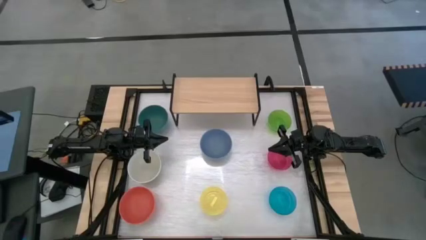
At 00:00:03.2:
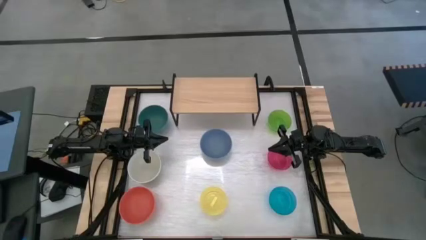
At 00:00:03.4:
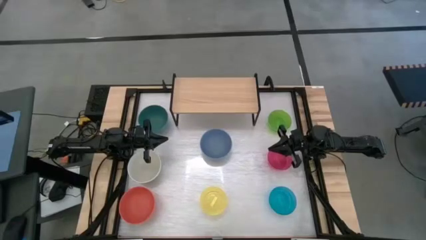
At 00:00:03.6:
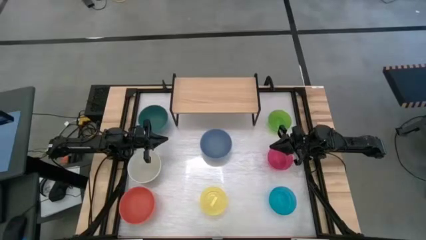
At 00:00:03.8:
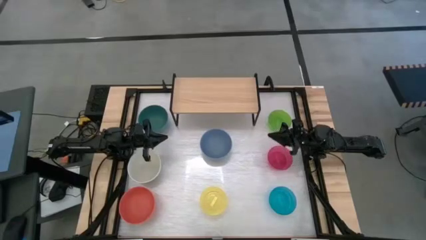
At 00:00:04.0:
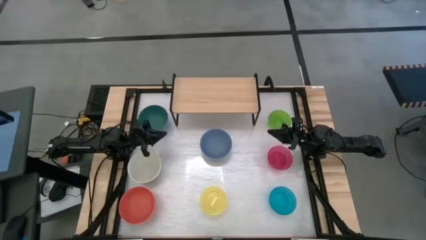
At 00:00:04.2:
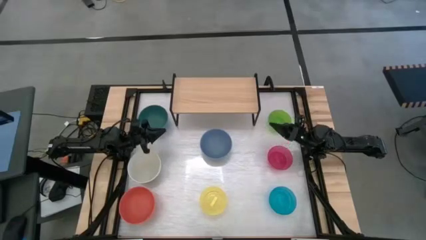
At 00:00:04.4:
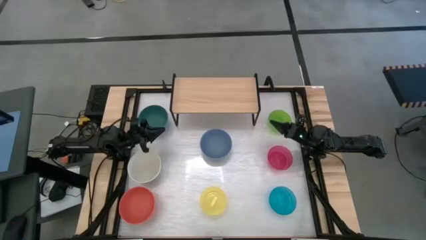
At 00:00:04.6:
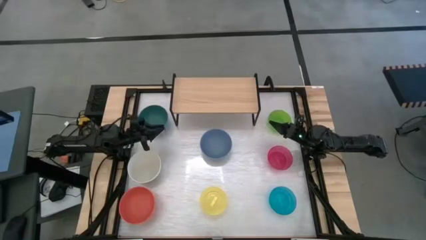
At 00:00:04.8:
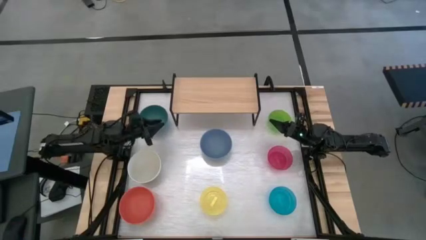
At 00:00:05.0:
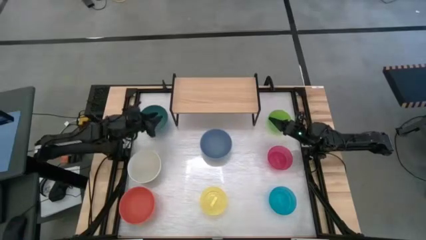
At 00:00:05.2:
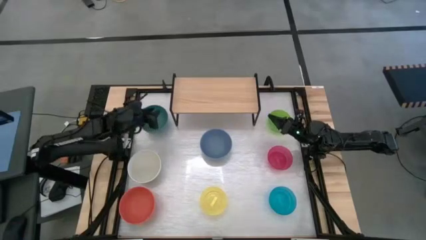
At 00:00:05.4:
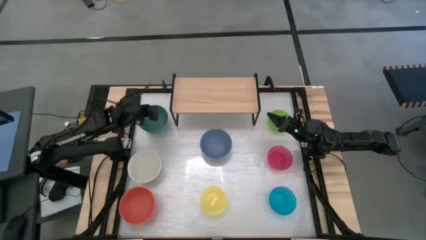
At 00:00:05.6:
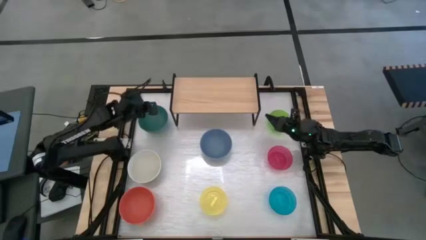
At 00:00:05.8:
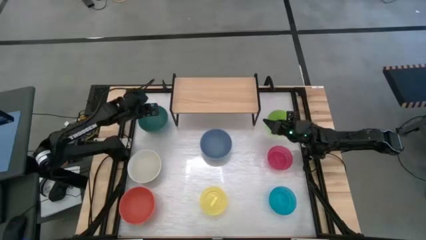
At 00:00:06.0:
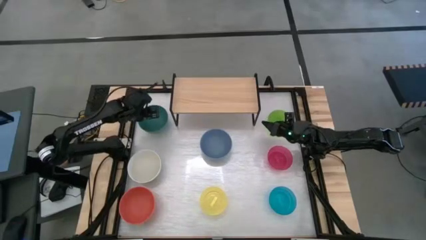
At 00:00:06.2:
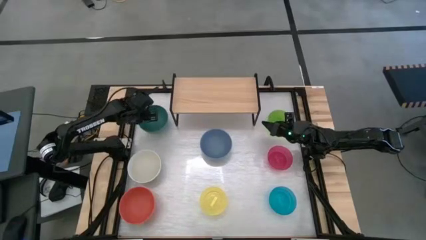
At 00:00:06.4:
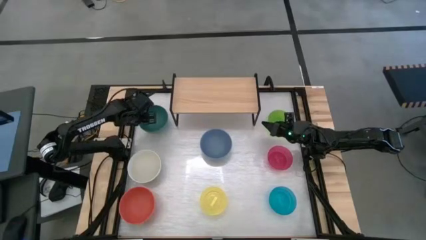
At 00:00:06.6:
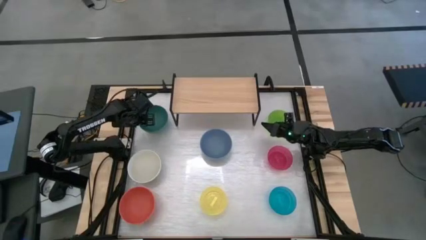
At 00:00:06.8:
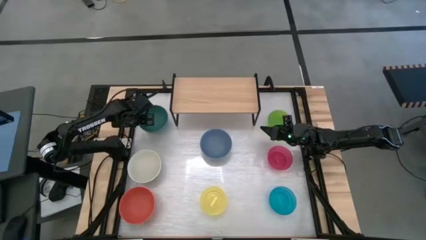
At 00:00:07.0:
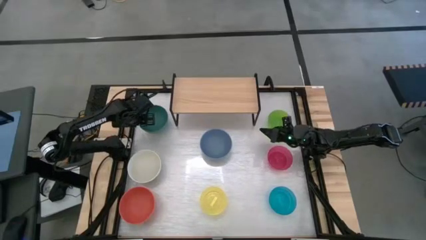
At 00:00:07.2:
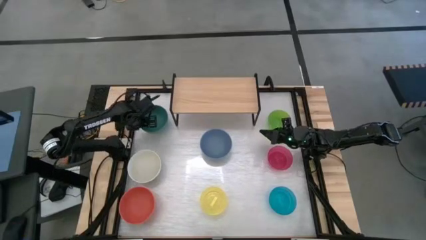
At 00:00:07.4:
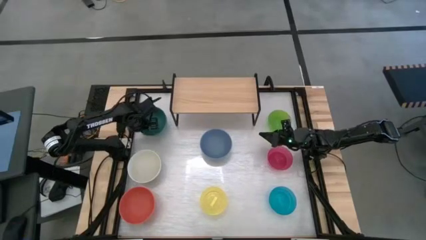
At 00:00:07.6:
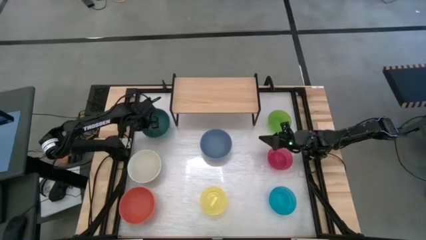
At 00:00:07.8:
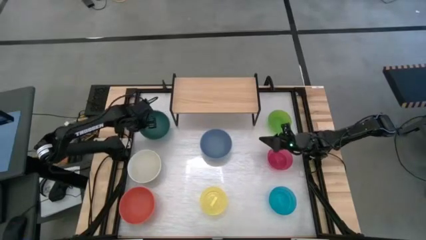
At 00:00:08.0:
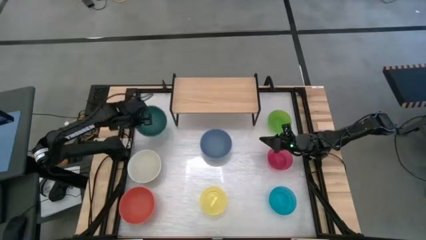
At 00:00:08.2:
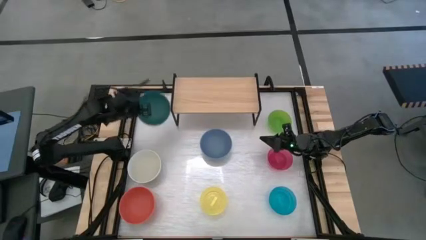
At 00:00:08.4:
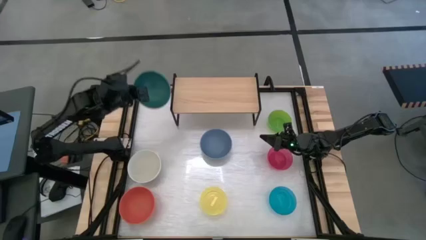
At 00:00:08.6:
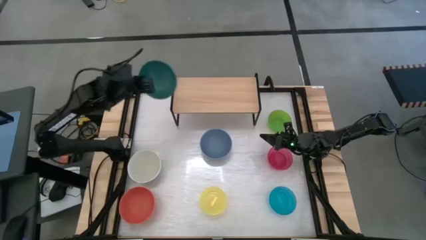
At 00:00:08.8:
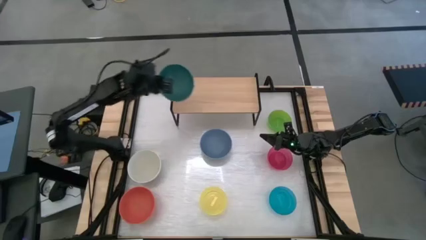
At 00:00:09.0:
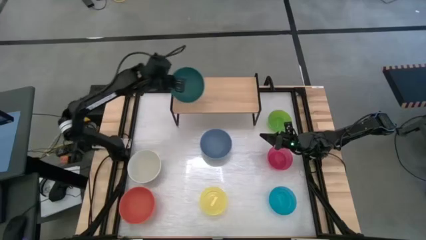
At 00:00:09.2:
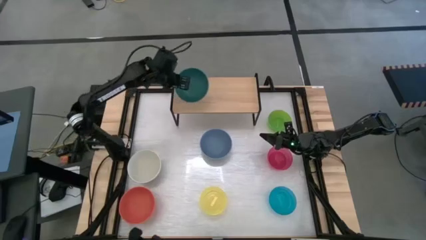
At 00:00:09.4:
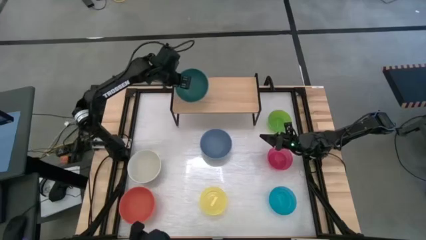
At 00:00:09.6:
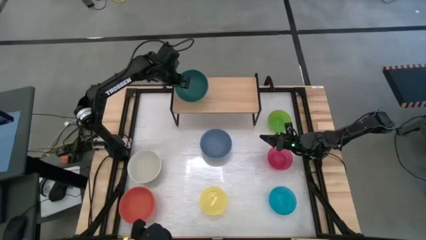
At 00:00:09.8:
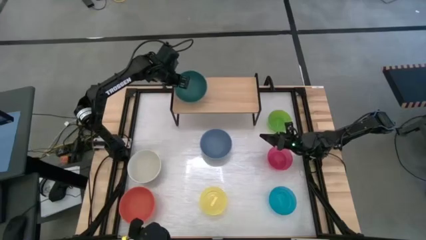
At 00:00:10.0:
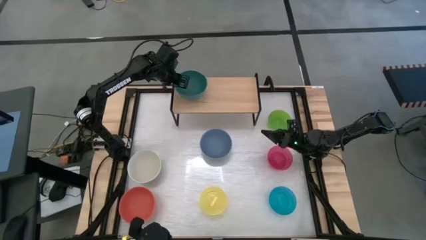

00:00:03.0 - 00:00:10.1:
Task: Place and stack bowls onto a shelf
Put the green bowl on the shelf

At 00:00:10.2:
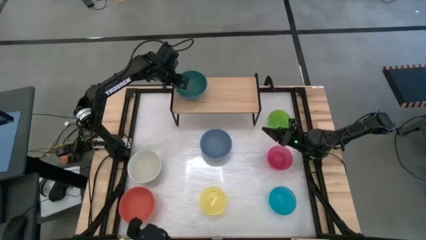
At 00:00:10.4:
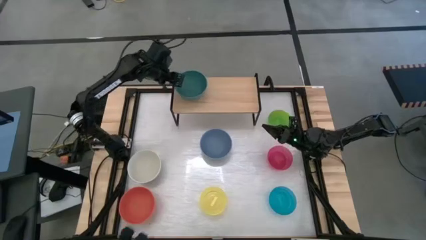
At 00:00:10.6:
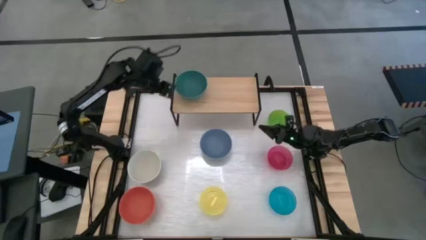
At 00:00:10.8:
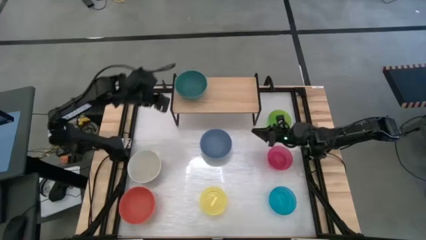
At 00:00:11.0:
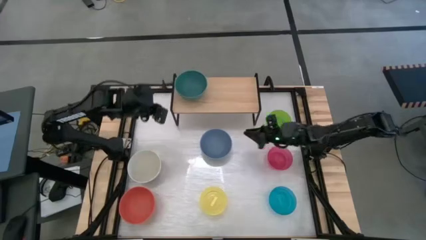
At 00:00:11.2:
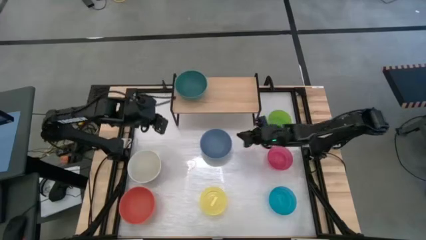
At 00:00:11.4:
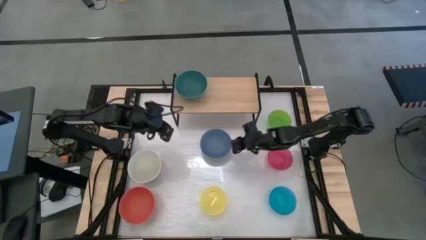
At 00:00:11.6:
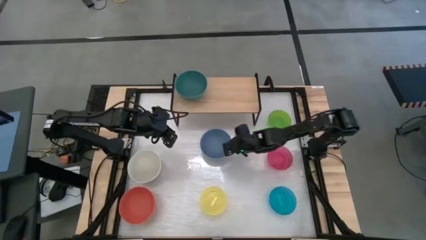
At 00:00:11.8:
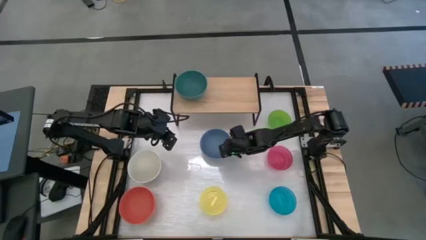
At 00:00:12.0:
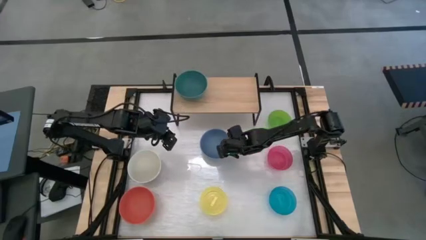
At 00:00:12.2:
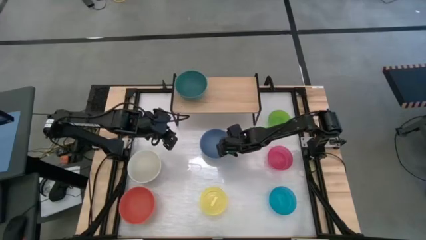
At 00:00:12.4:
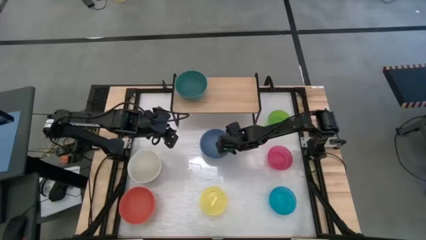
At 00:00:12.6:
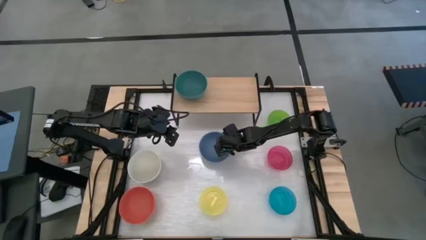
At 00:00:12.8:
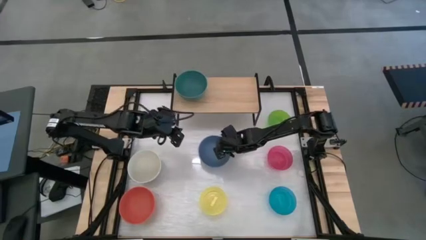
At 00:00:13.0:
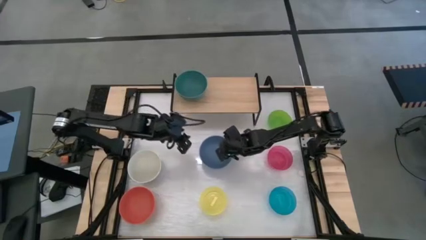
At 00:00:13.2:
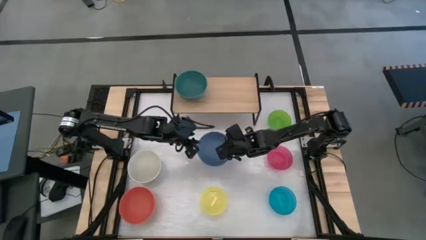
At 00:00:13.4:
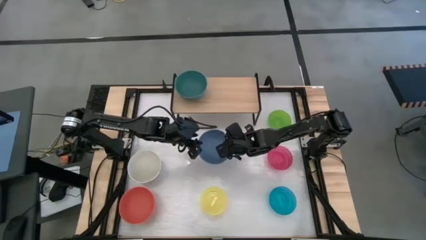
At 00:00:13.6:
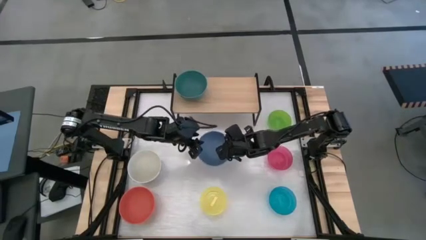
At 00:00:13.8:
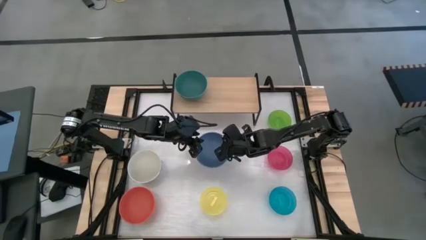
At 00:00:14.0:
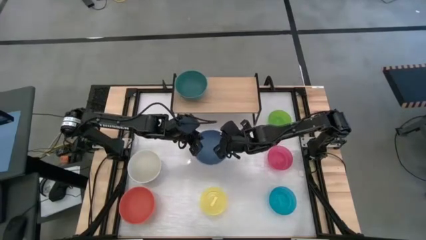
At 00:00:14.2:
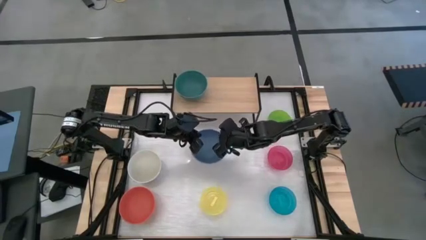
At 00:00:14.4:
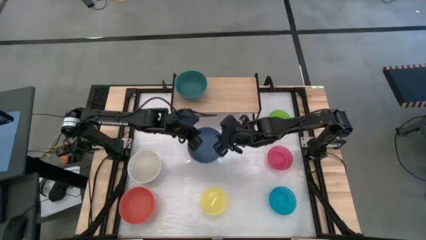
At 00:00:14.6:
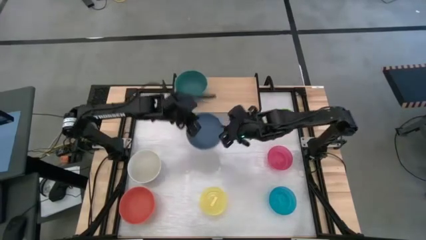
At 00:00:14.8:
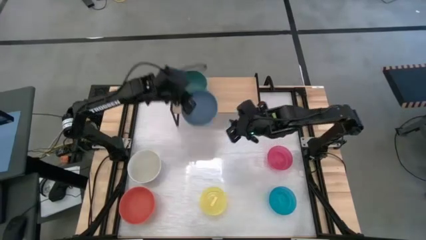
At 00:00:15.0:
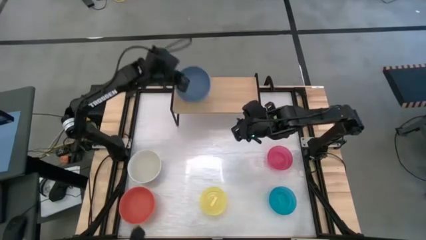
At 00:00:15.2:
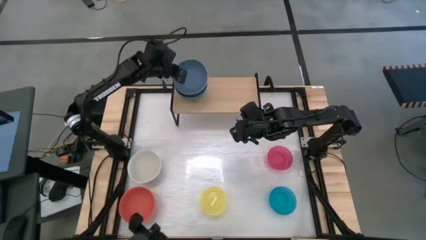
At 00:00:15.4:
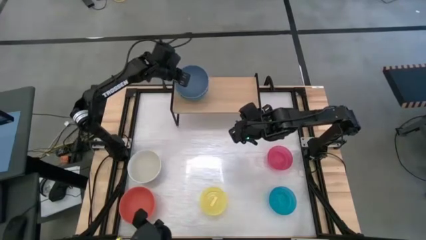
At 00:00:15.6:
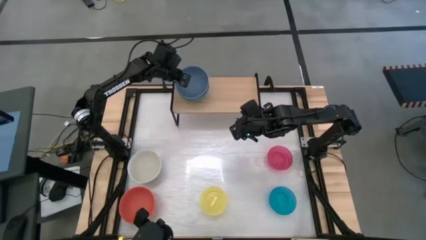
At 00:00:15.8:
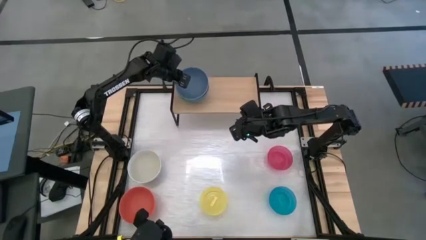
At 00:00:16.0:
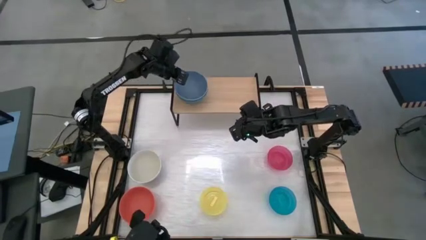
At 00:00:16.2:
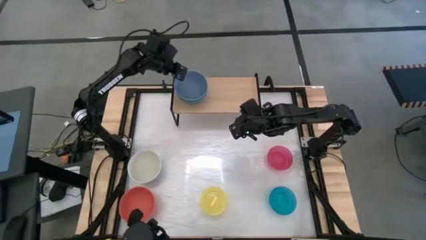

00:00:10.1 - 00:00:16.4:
Stack the blue bowl on top of the green bowl on the shelf

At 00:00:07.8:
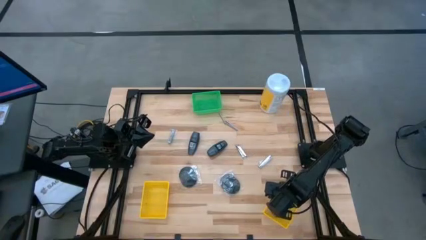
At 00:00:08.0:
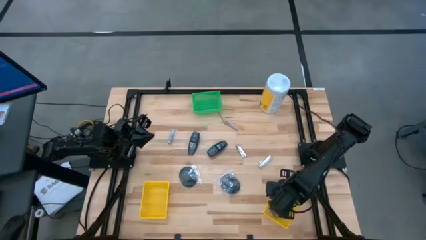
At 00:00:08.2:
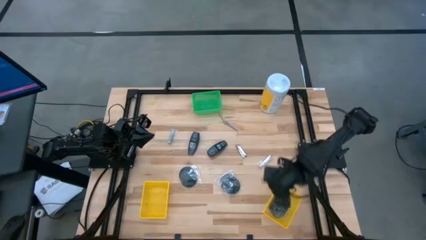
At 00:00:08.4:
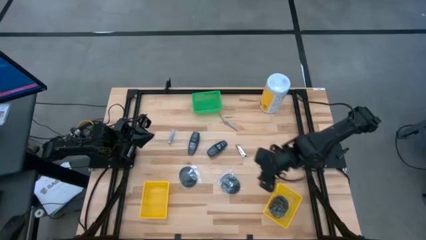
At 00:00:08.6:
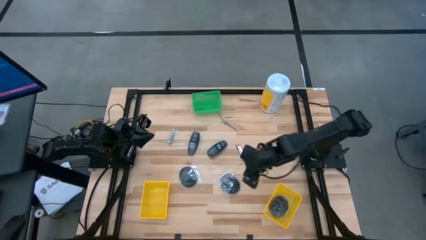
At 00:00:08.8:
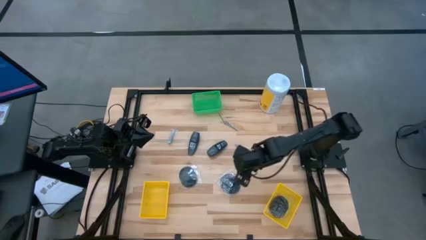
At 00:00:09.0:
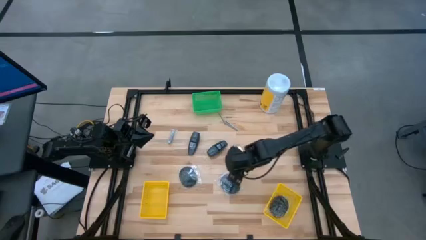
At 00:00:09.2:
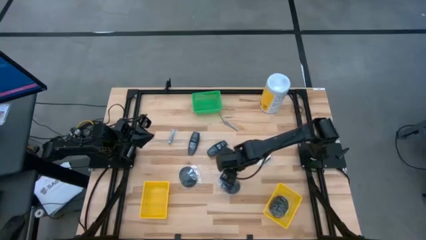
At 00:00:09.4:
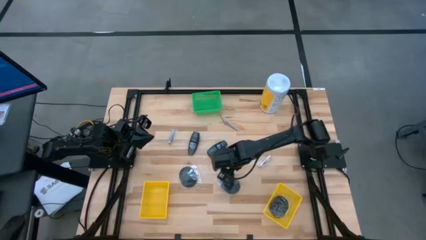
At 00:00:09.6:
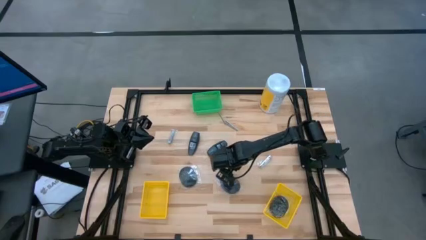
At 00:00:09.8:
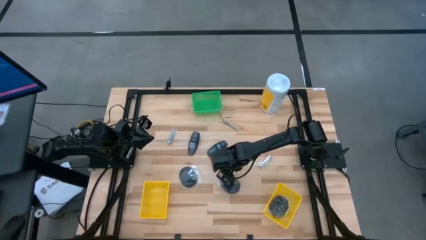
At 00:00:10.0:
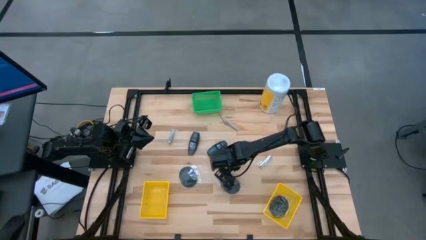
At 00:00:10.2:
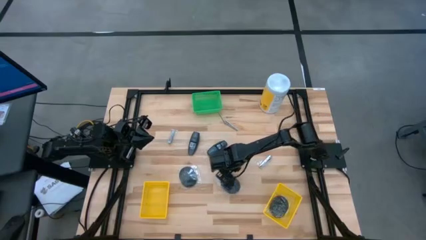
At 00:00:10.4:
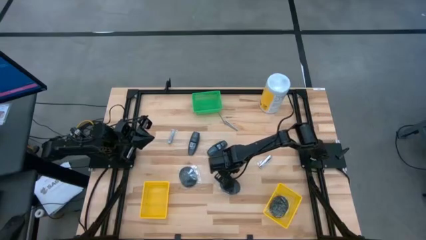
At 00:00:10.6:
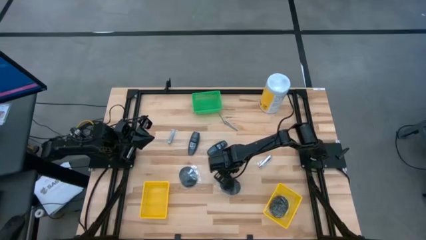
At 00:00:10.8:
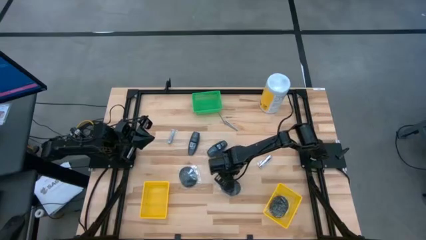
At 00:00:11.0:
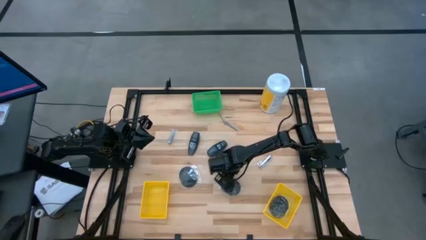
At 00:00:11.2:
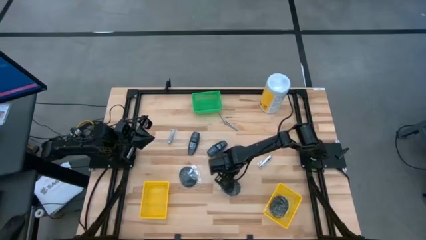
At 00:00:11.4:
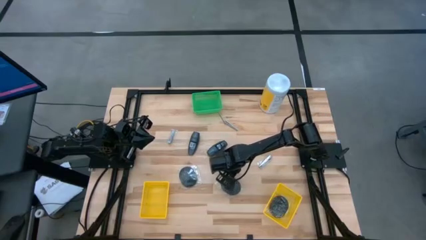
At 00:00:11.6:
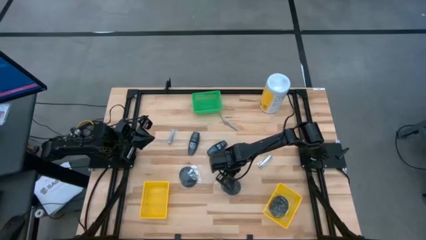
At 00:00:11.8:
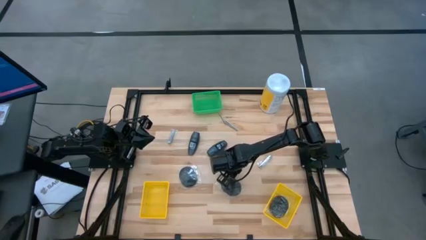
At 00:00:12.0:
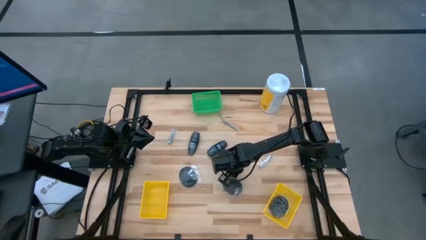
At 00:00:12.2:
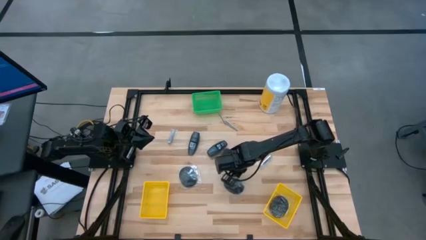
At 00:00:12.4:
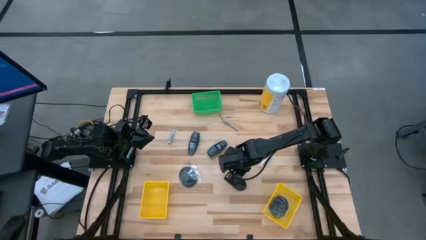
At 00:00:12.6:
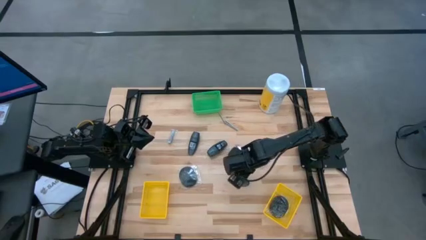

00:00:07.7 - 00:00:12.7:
Task: Pick & Place Travel size toiletries
Put the black hairbrush into the right yellow bin
